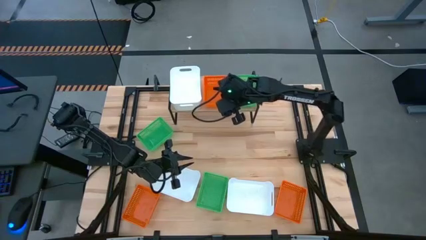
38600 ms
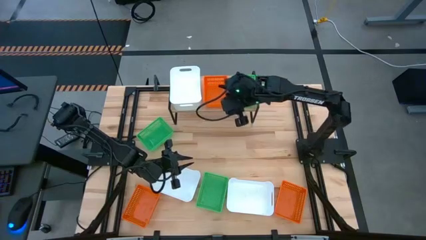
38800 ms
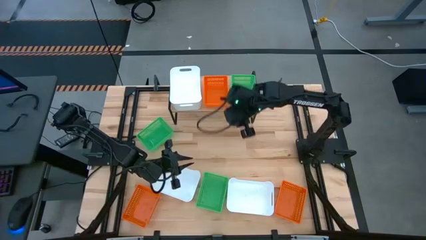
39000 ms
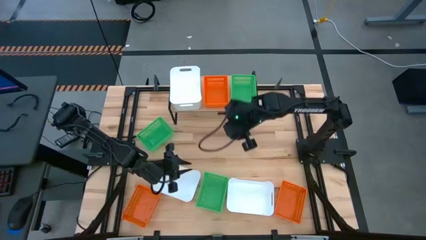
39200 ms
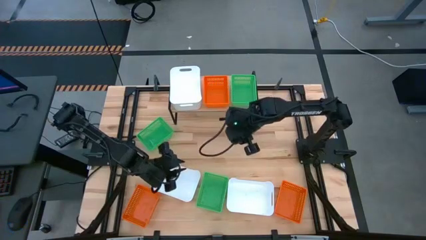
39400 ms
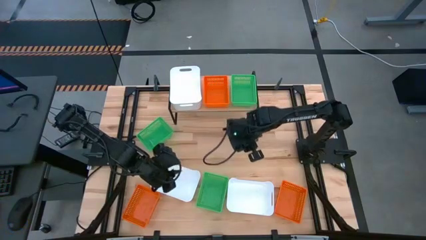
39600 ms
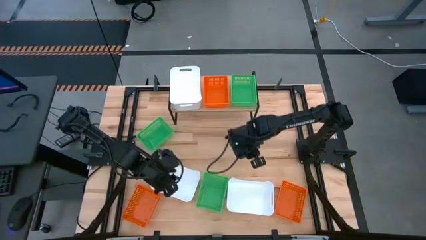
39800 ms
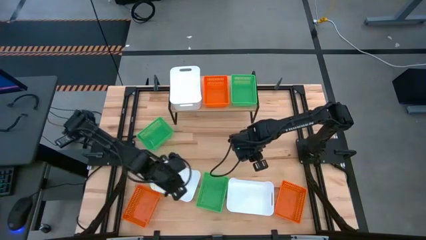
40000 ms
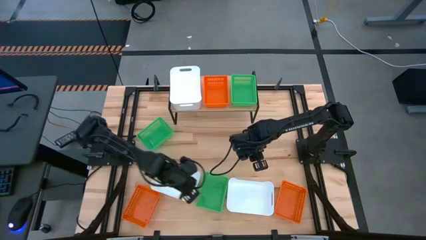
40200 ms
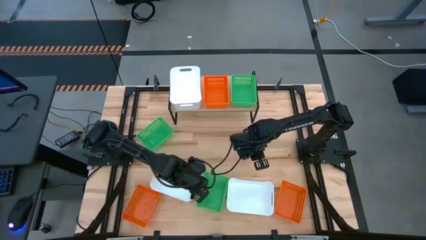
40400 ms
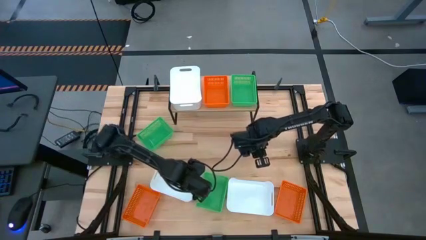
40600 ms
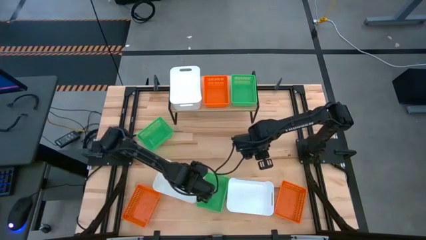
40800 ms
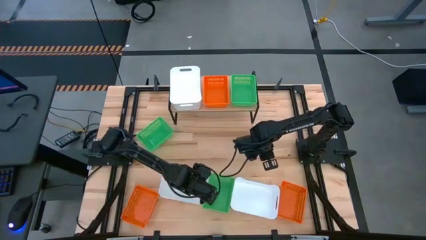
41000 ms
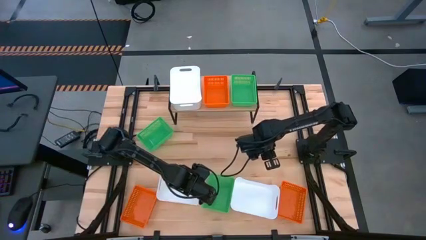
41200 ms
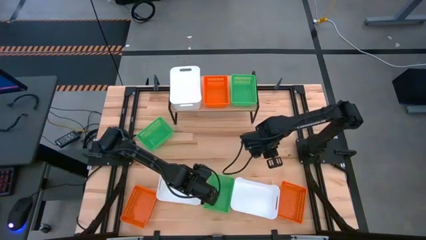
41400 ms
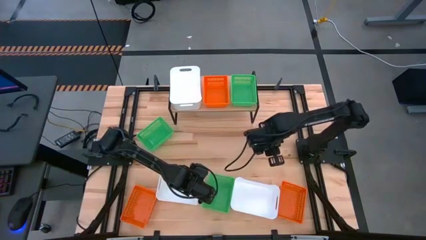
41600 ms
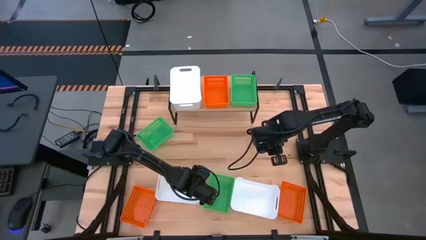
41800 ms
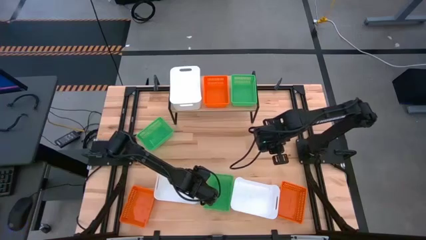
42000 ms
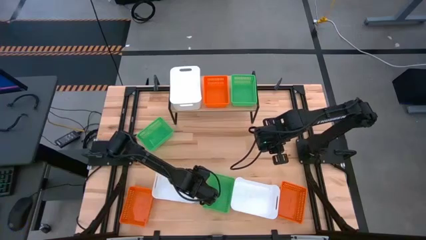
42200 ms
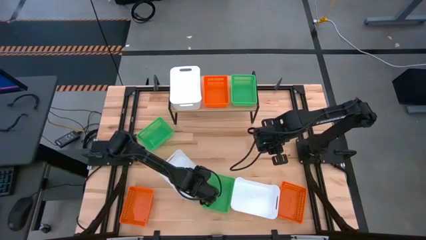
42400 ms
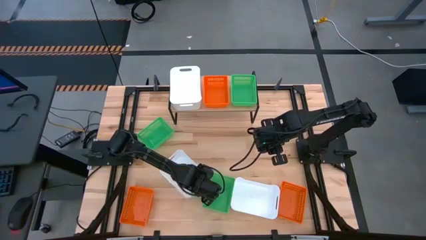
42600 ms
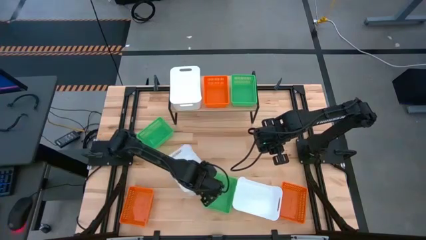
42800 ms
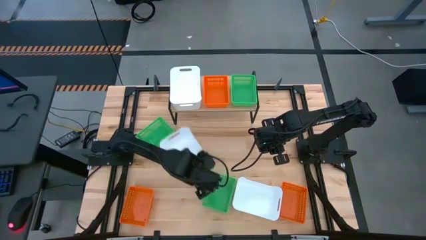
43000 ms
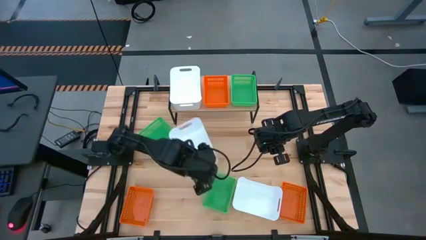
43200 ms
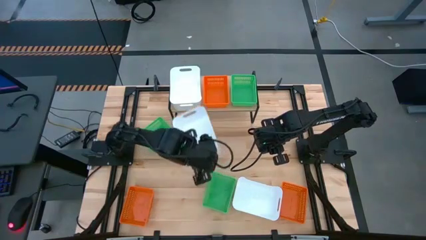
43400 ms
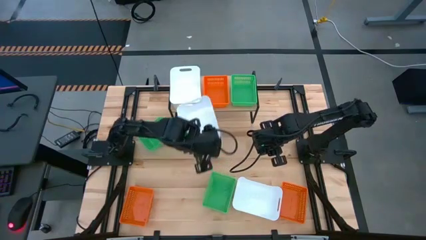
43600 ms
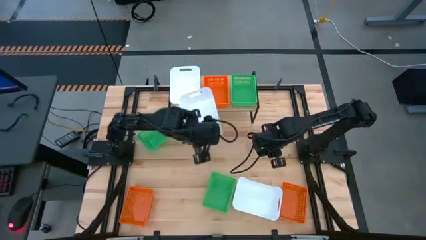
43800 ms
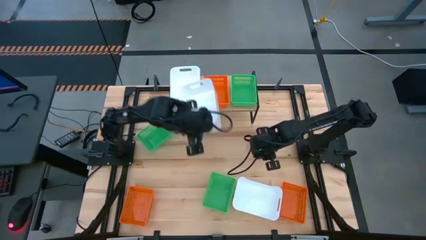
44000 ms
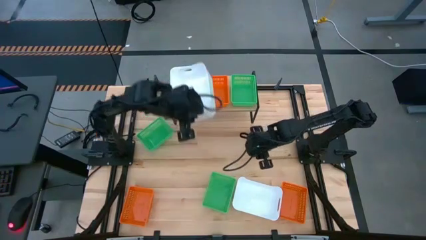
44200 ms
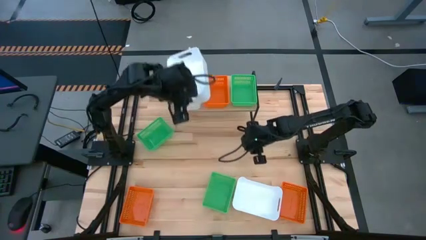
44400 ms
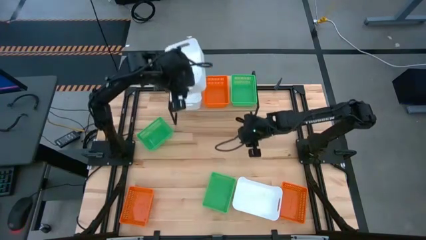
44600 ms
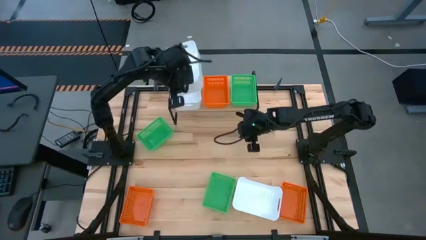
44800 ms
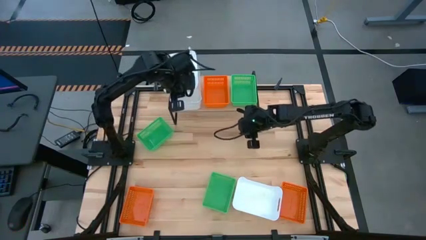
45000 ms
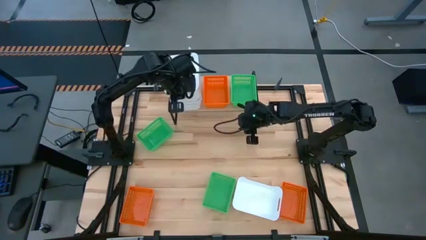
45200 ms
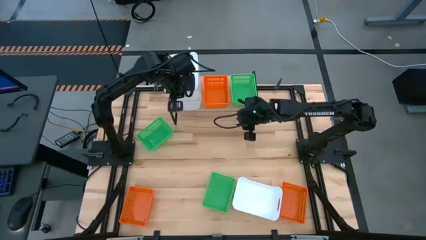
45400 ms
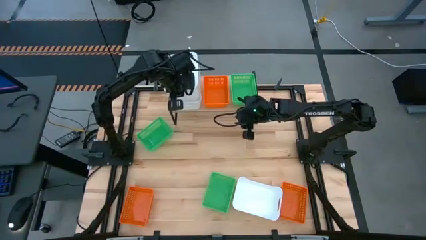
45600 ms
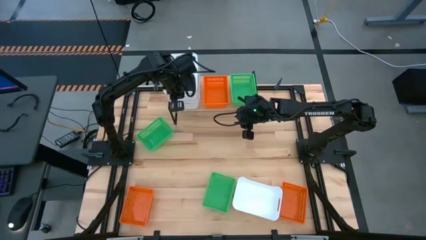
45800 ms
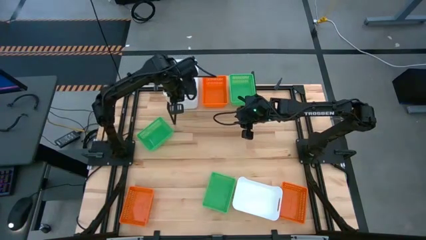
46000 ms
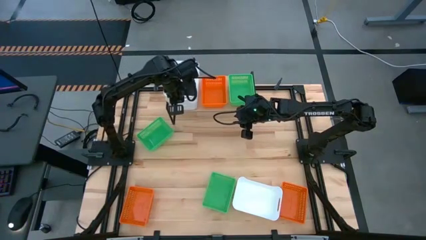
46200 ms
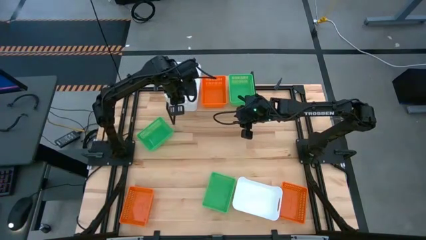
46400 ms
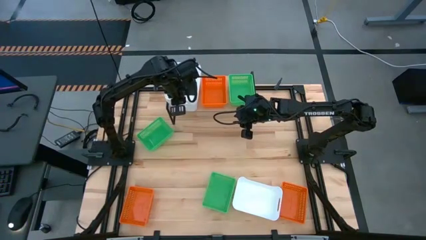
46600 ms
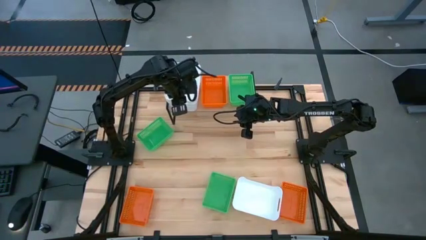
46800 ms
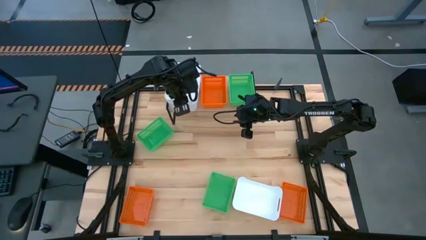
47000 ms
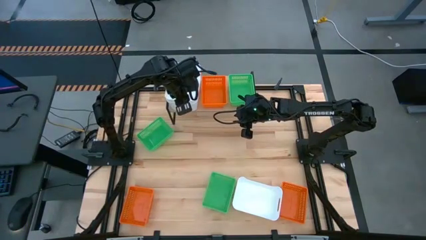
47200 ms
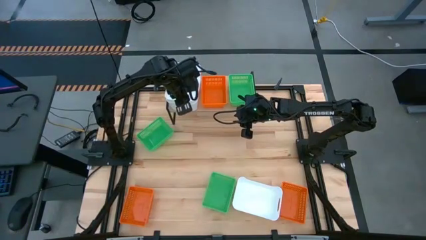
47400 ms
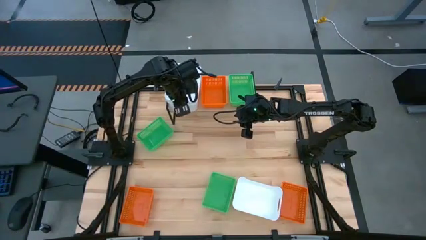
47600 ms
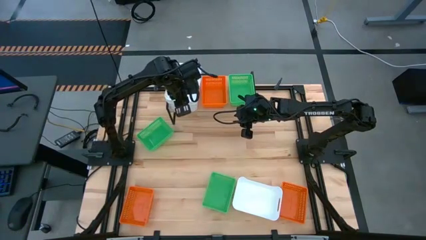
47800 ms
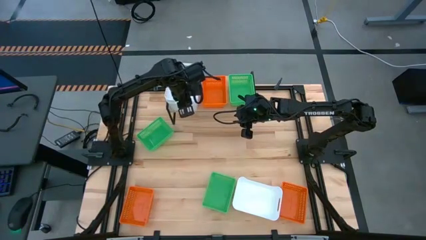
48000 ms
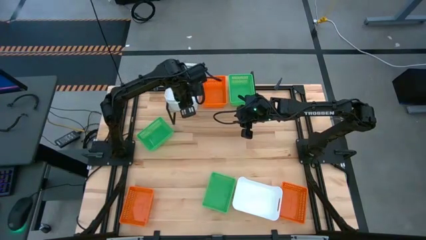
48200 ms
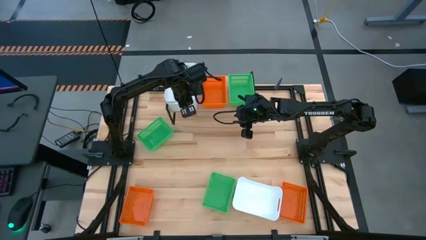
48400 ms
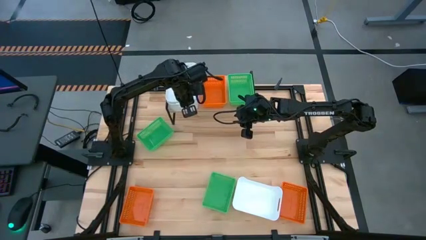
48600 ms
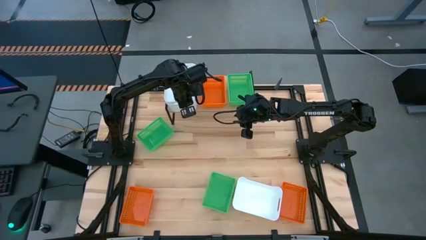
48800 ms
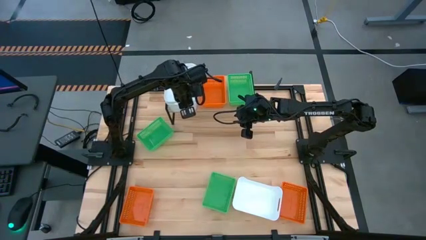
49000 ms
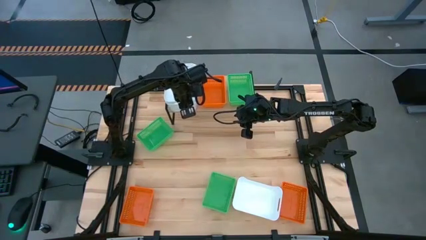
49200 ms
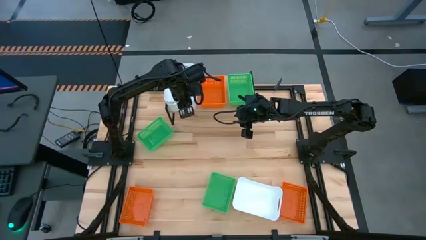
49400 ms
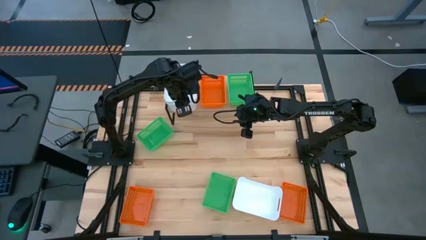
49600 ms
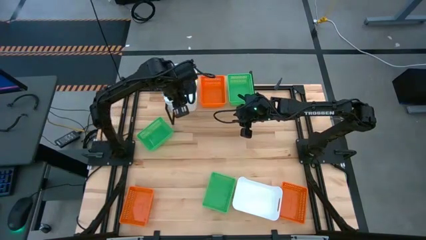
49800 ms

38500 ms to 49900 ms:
Task: Stack baskets on shelf by color
Stack the left white bin on top of the white bin on the shelf

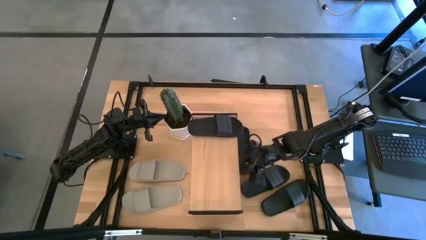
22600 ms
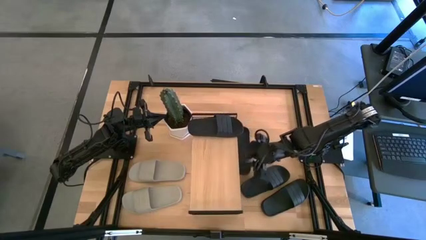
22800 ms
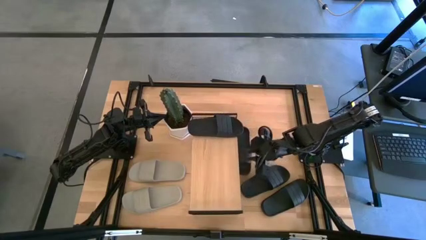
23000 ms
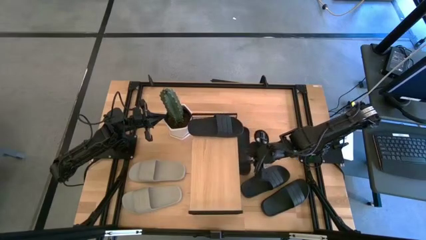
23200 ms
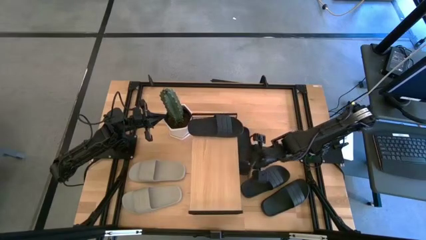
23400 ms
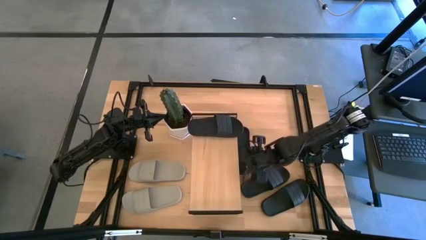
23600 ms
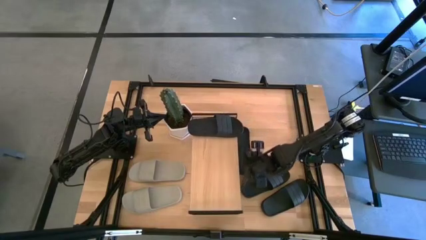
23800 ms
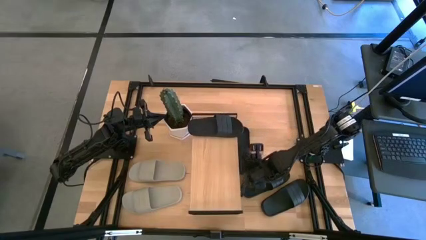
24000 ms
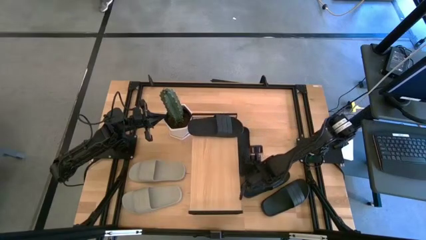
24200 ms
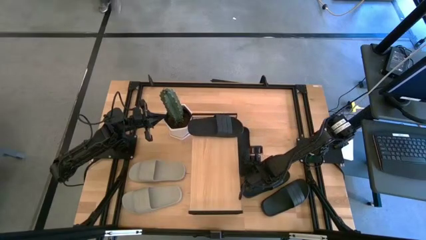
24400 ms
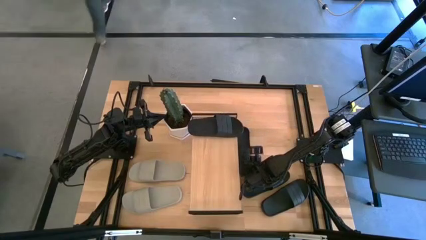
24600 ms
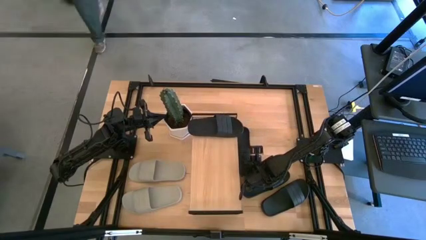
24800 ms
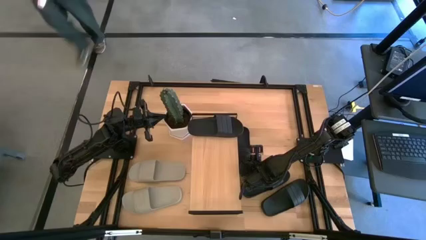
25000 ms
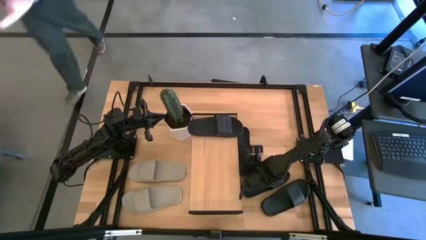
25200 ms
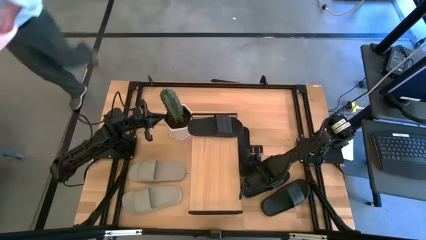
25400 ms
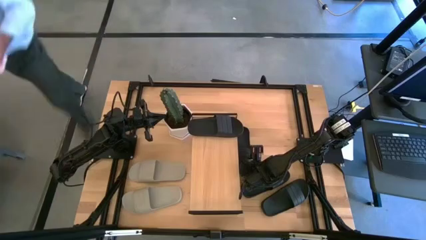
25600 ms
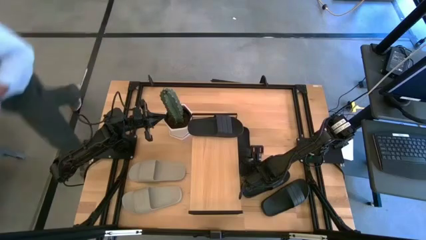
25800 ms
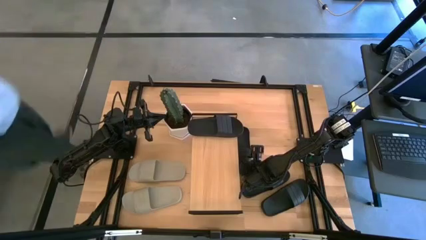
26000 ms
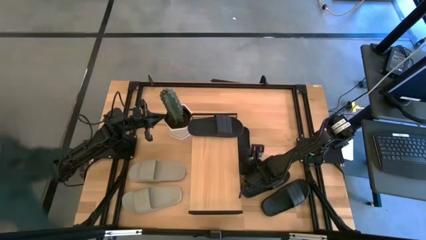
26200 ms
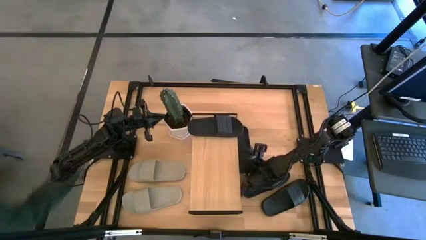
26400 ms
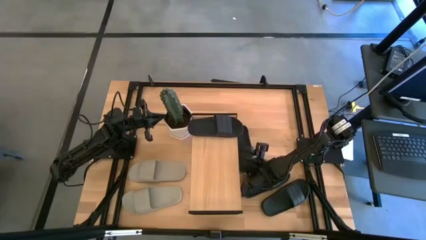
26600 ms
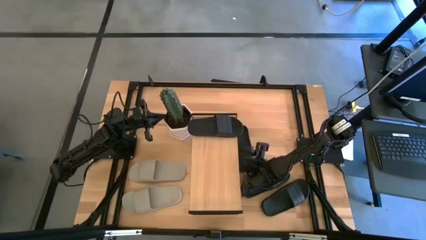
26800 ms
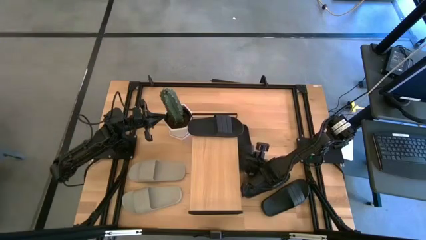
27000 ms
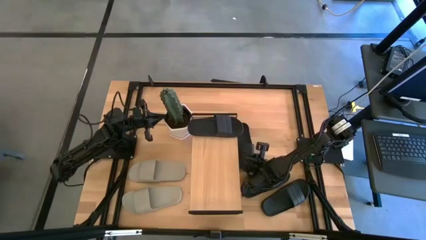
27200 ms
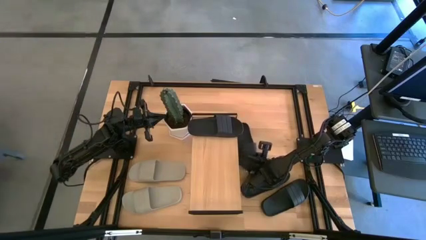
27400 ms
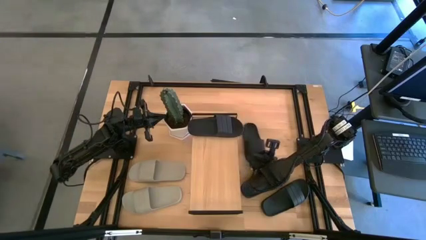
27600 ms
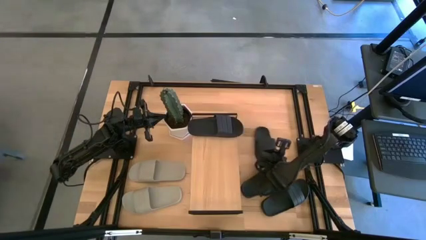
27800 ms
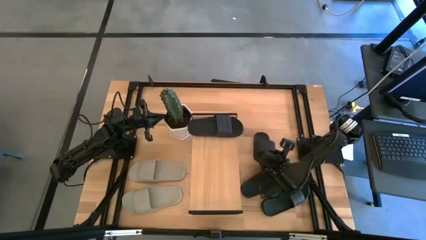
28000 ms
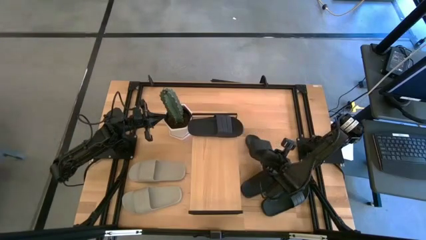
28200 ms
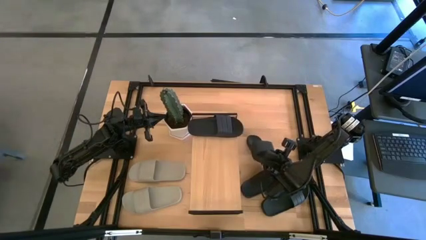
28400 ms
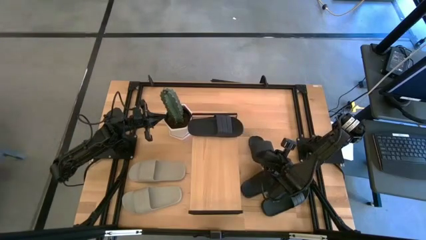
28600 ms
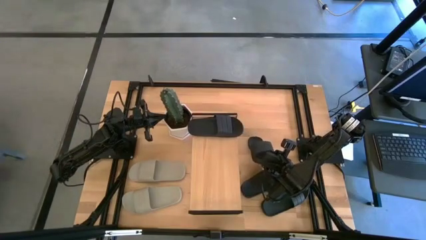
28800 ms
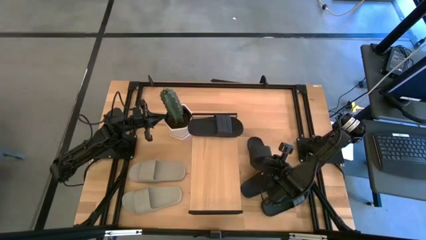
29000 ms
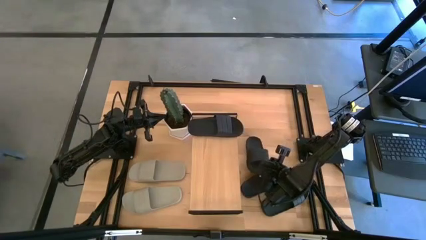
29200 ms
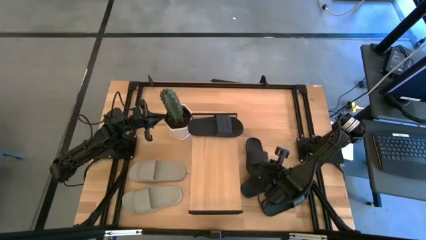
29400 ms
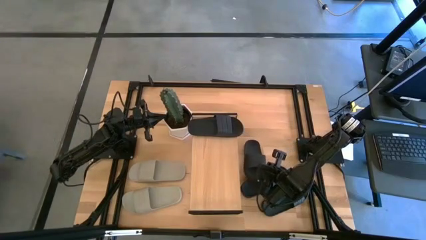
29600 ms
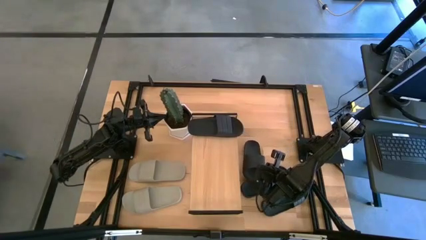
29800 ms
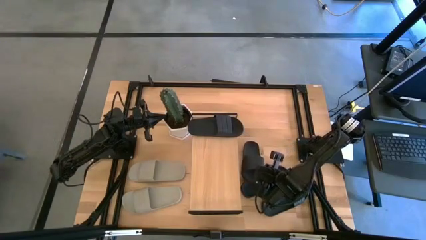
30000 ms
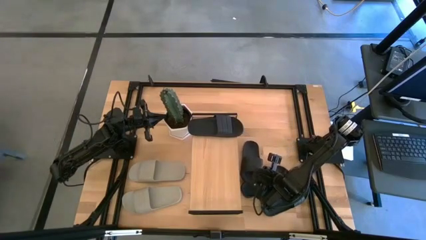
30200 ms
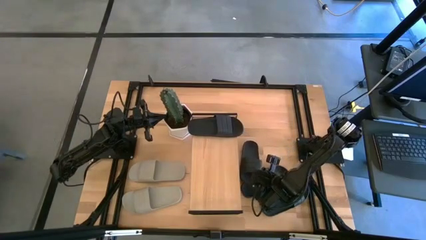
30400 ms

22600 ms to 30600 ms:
Task: Pick and place slides into the shelf
Put the black slide on the shelf
